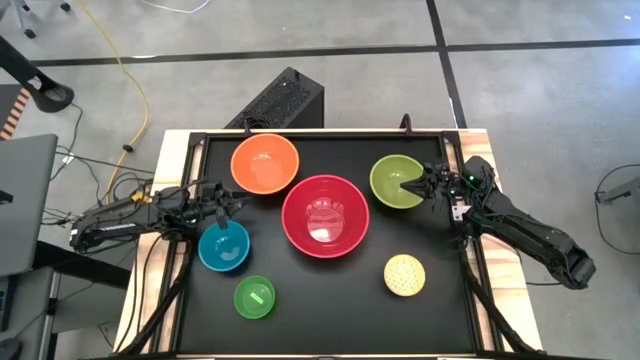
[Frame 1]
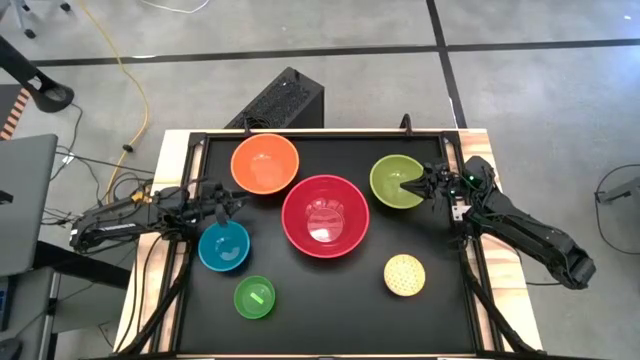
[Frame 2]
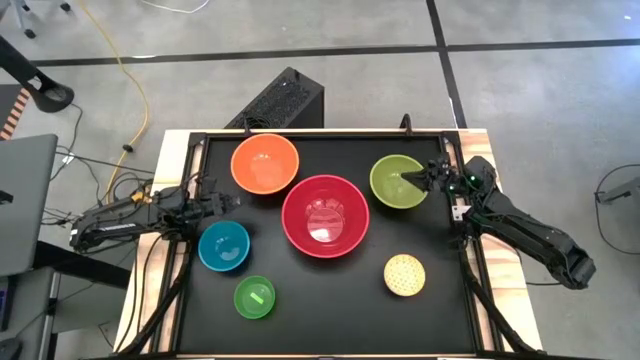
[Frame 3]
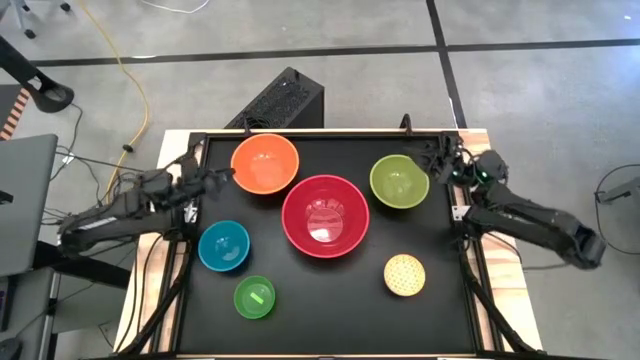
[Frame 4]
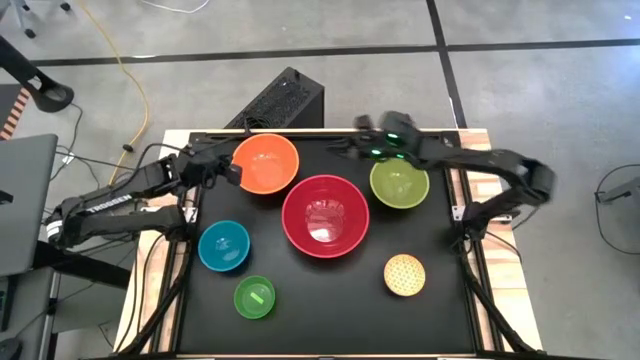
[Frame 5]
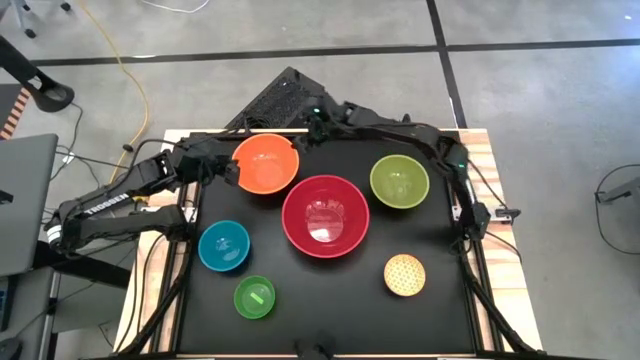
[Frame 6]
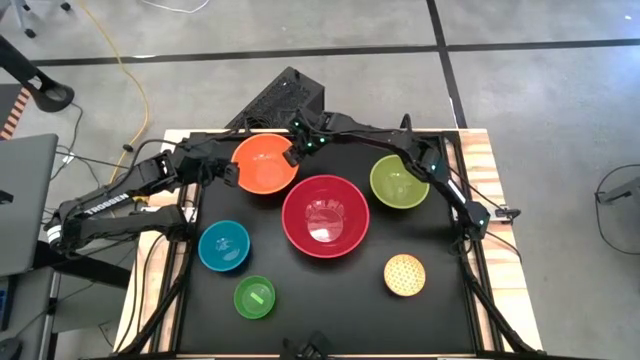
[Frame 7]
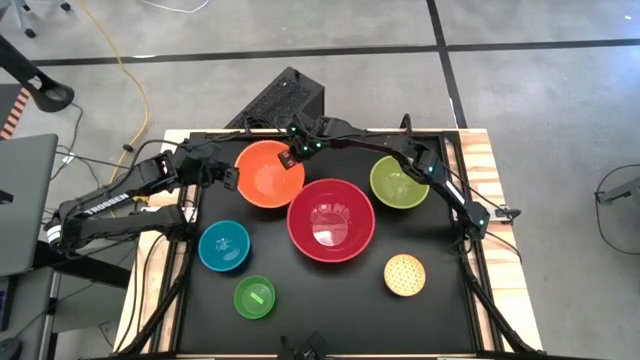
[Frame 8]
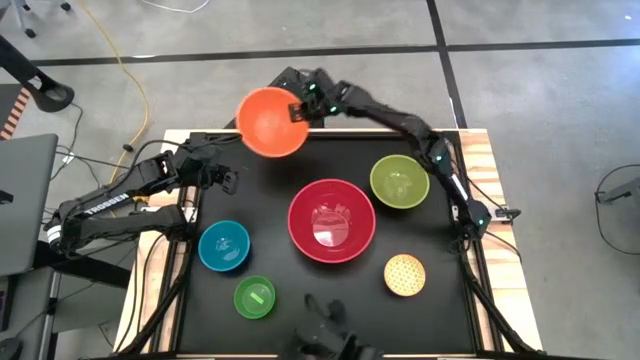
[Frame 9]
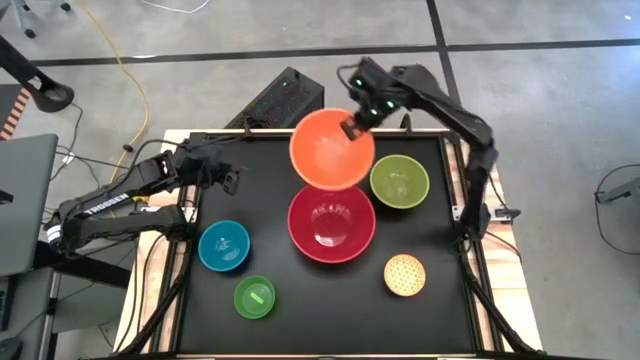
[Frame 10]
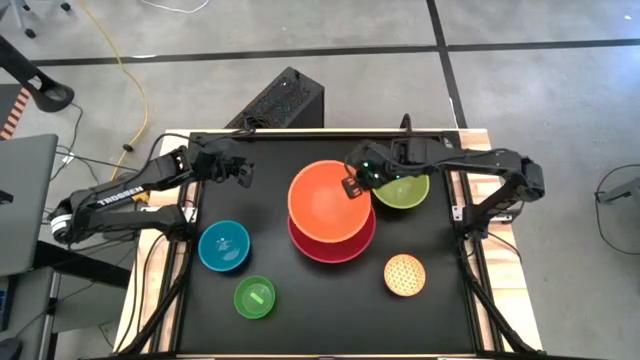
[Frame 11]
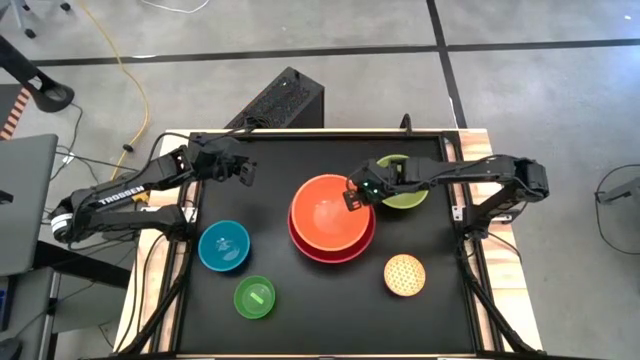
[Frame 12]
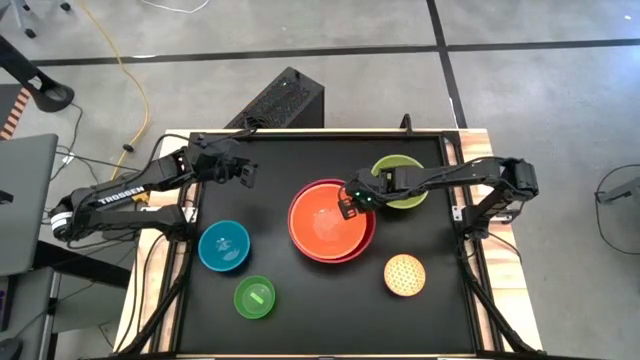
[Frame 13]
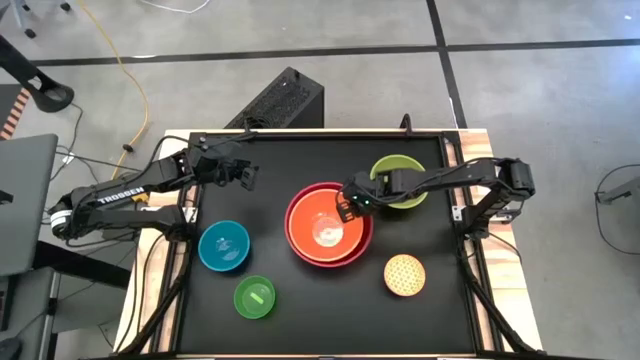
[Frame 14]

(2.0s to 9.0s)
Stack the orange bowl on top of the red bowl

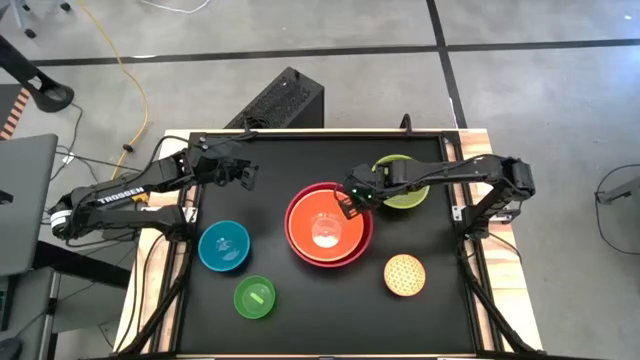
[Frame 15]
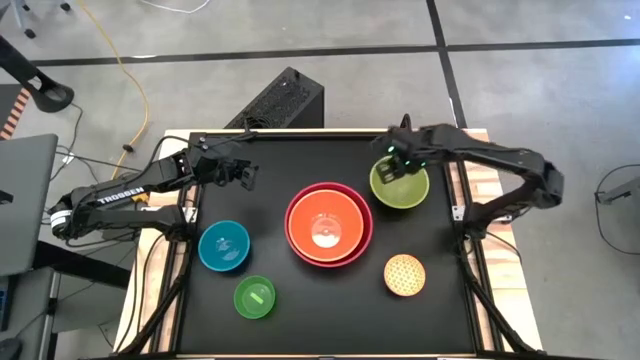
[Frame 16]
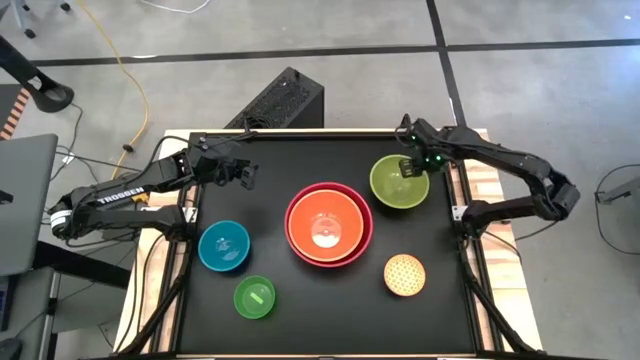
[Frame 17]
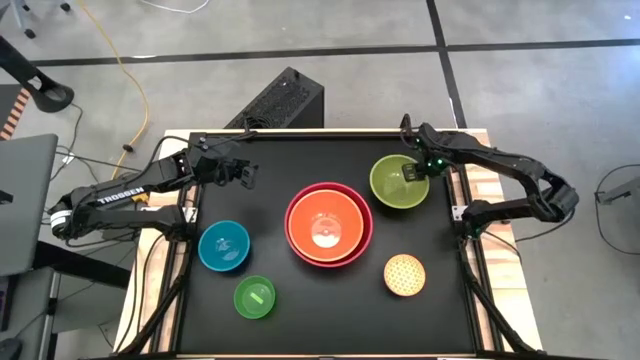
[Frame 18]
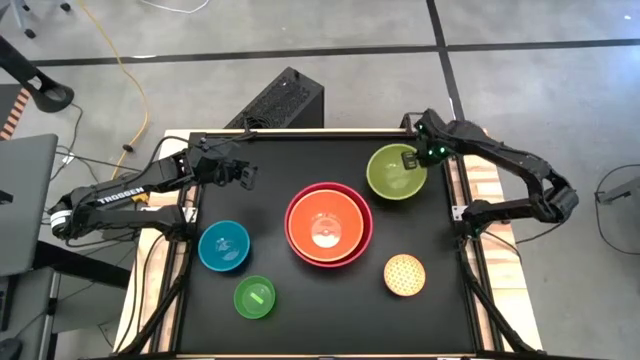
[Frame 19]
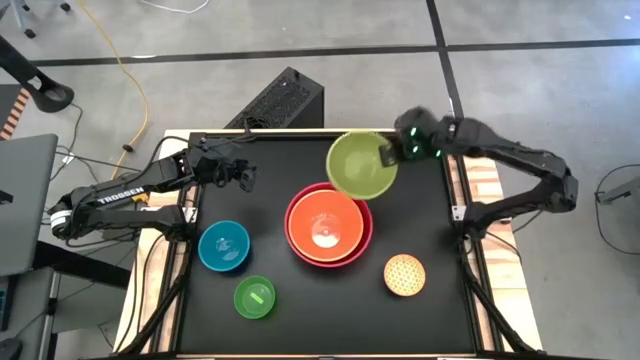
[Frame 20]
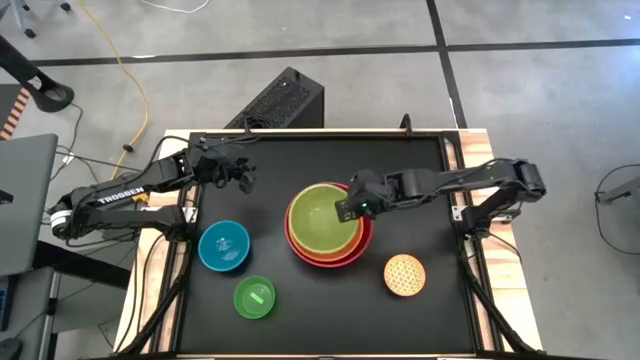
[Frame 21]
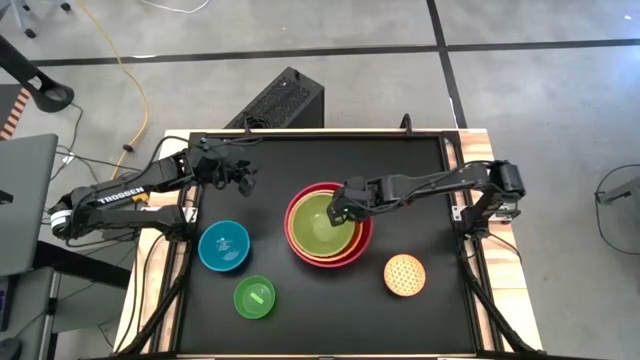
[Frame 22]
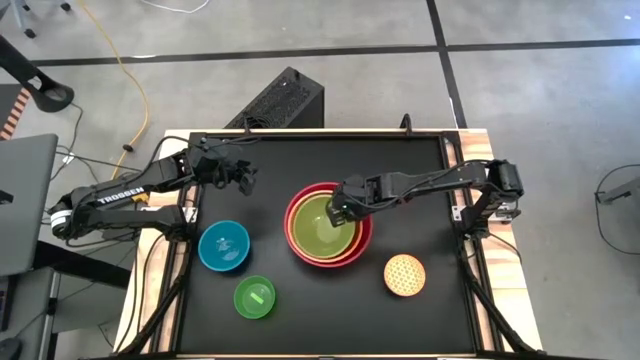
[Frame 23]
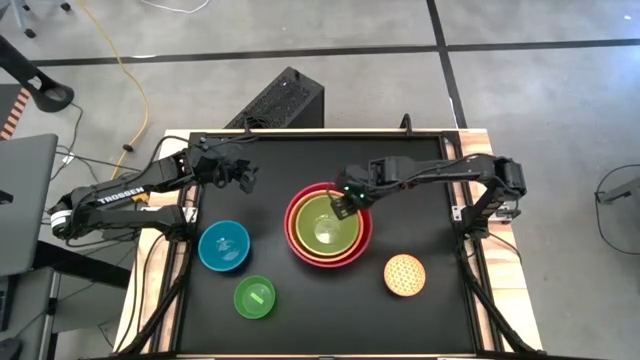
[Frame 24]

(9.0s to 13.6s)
Stack the light green bowl on top of the orange bowl

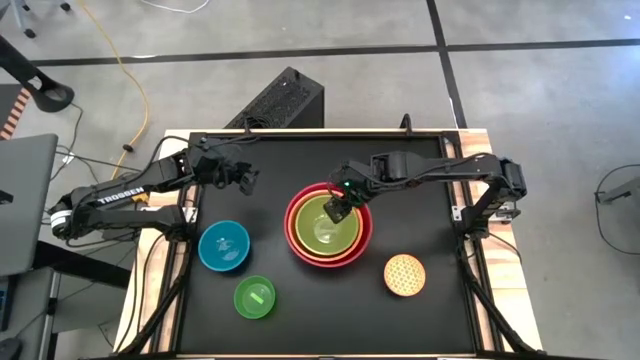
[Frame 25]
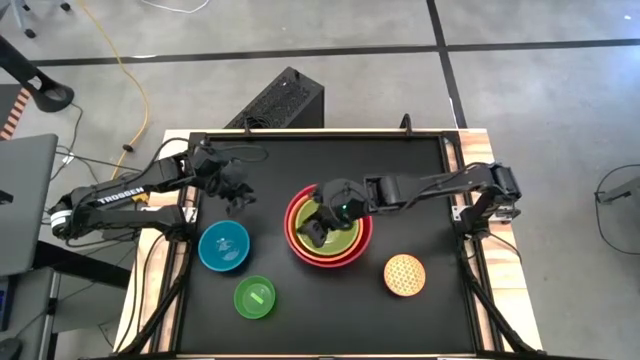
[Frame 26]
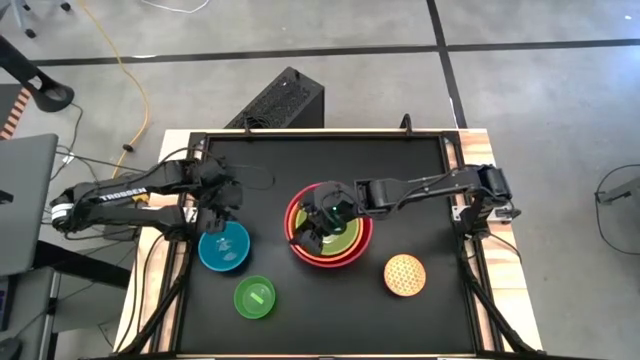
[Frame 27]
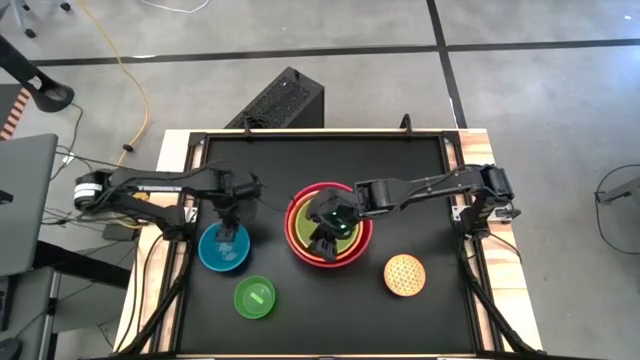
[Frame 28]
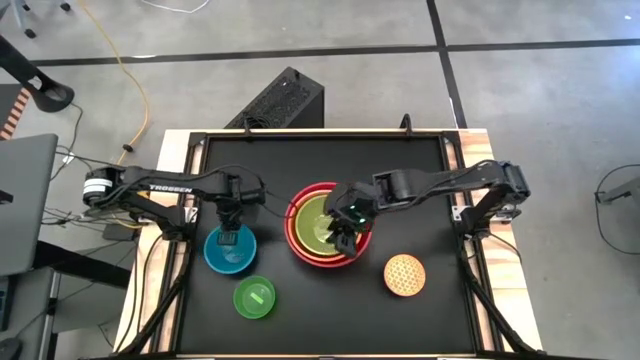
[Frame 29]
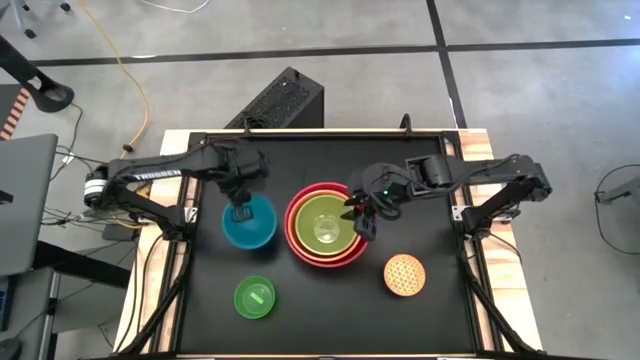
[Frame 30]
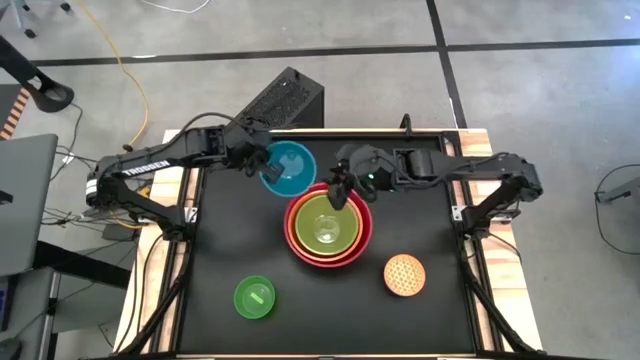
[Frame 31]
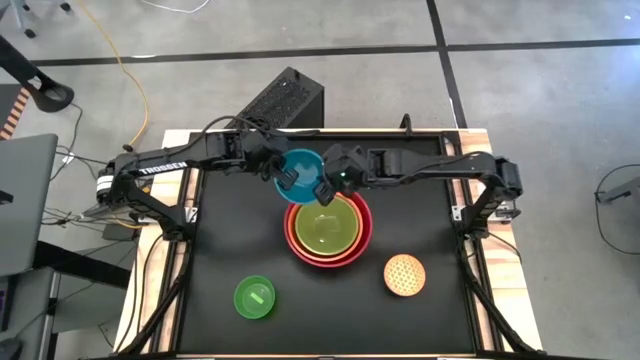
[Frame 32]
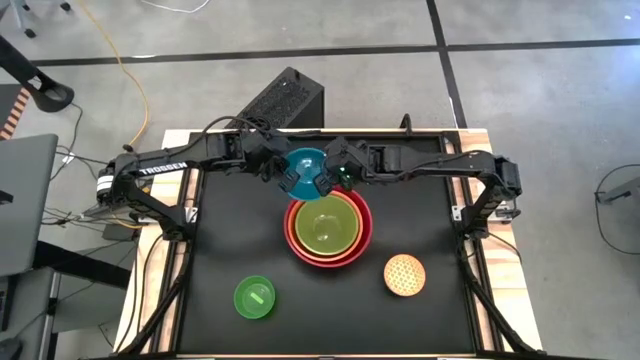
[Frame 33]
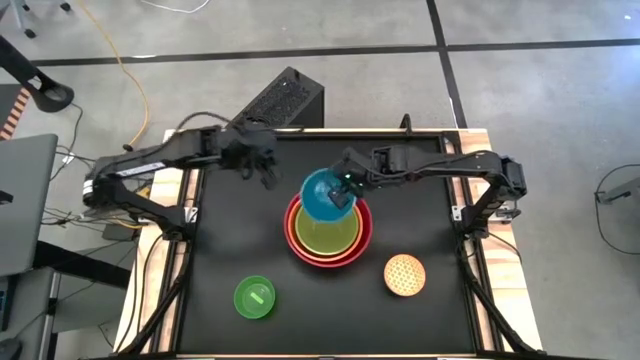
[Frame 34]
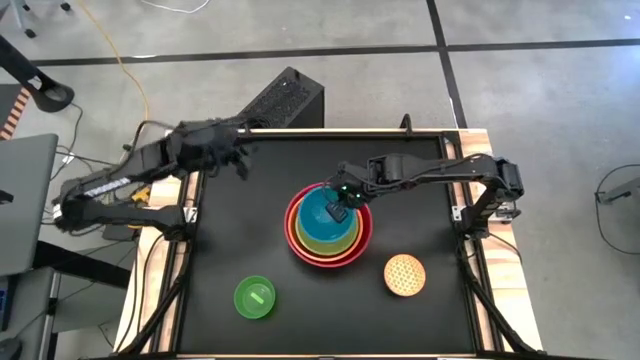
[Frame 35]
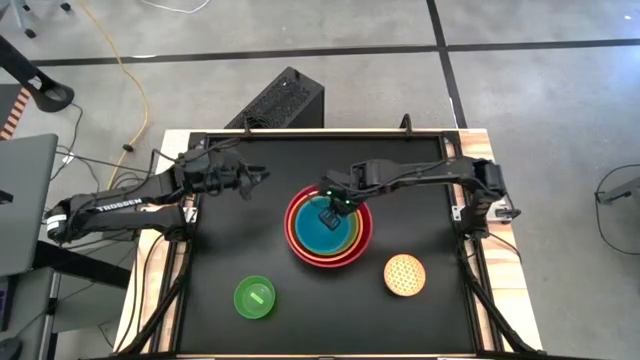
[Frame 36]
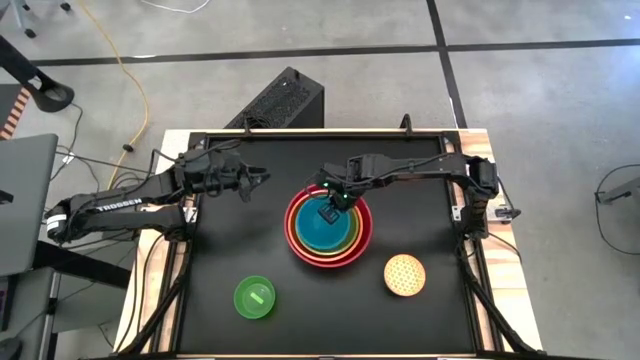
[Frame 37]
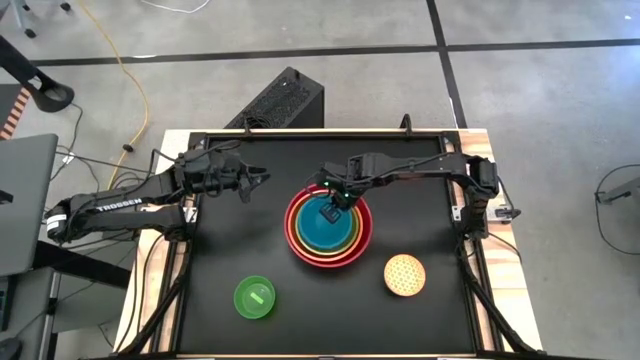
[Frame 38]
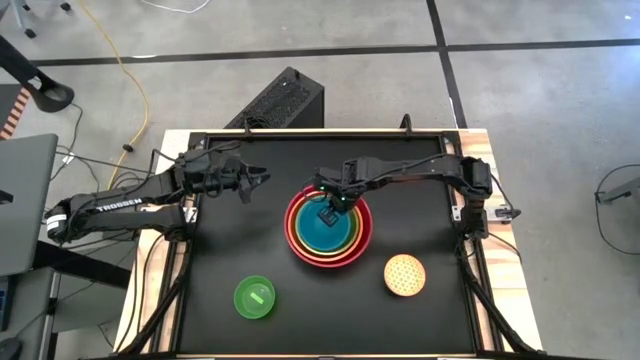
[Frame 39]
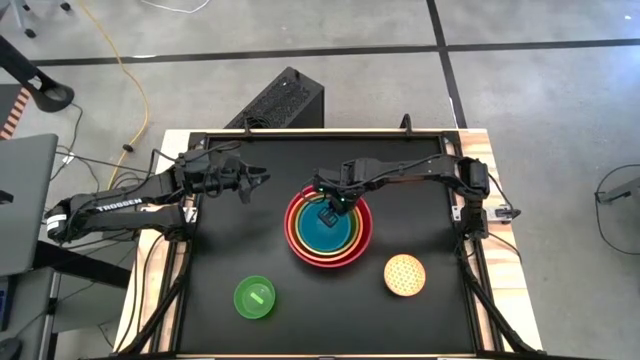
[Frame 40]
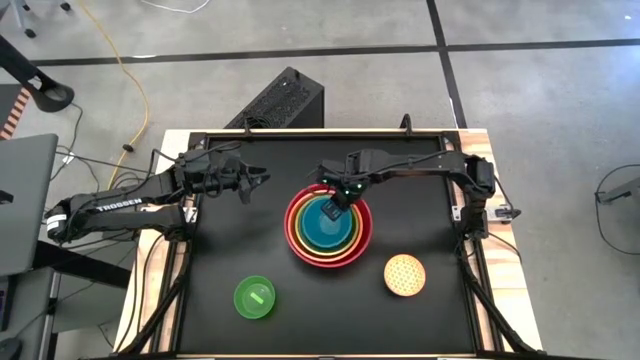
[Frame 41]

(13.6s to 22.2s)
Stack the blue bowl on top of the light green bowl
